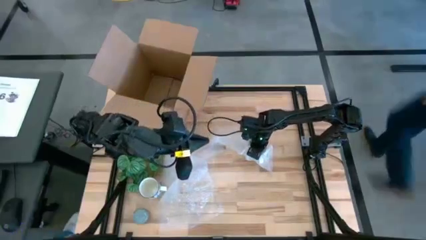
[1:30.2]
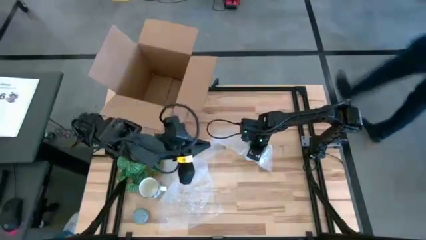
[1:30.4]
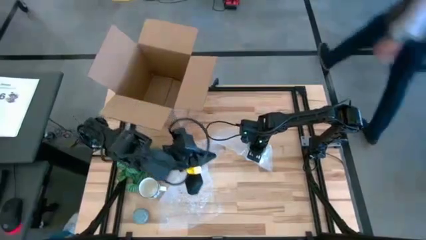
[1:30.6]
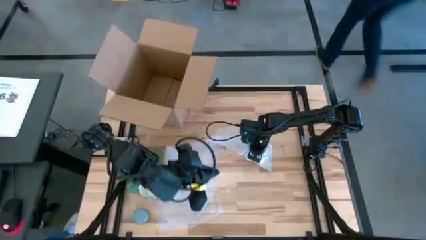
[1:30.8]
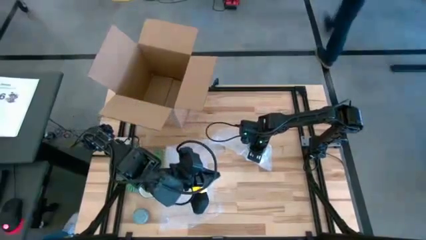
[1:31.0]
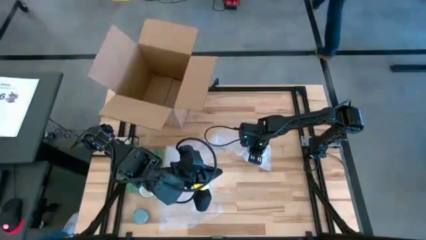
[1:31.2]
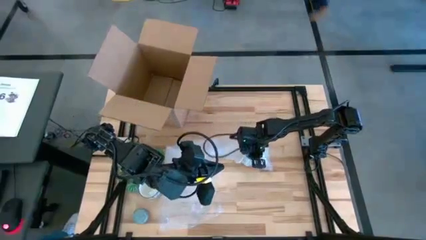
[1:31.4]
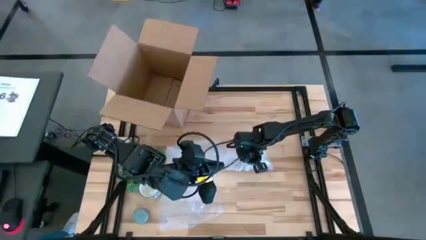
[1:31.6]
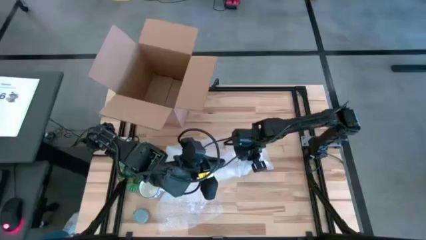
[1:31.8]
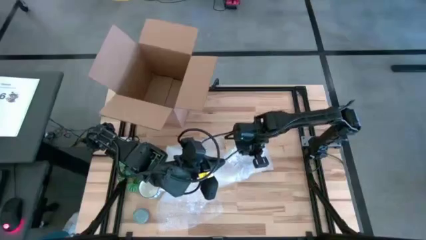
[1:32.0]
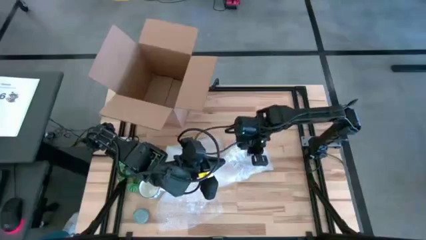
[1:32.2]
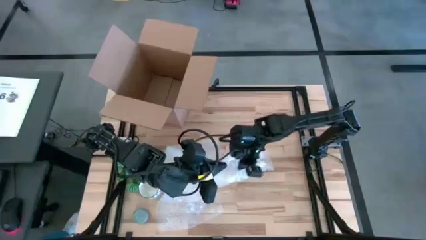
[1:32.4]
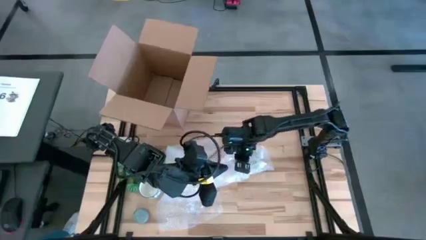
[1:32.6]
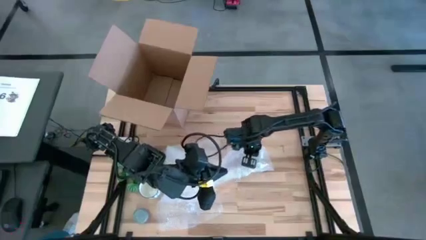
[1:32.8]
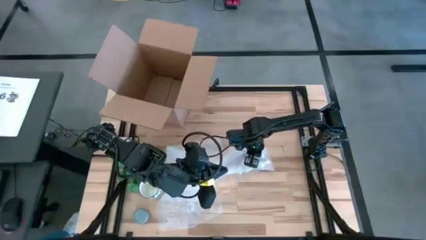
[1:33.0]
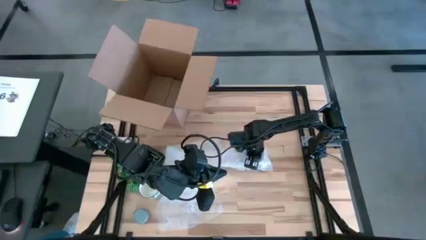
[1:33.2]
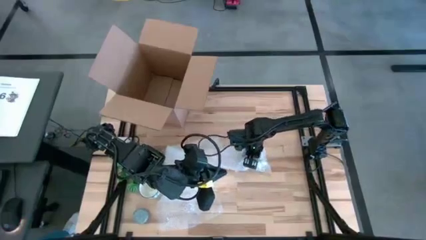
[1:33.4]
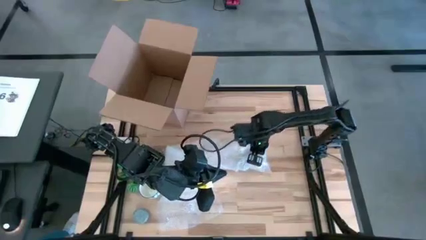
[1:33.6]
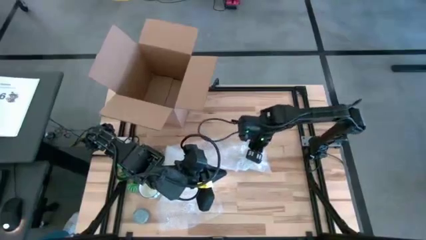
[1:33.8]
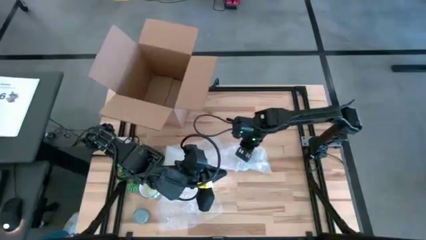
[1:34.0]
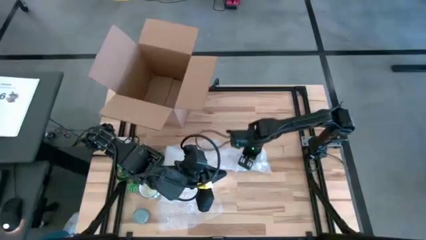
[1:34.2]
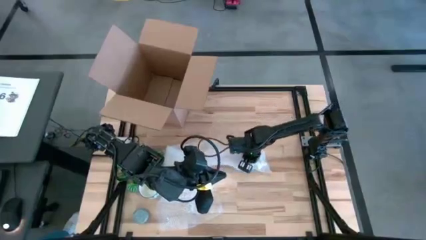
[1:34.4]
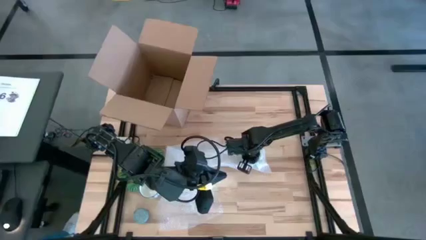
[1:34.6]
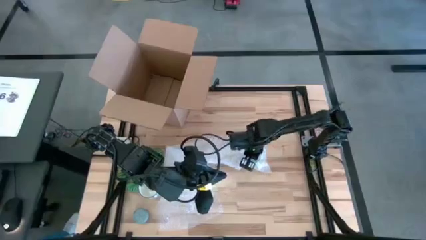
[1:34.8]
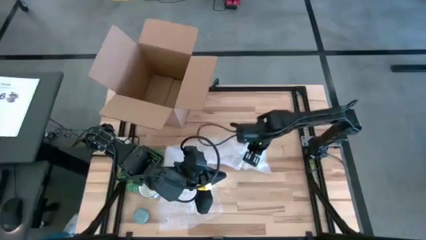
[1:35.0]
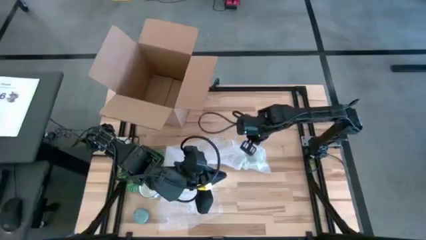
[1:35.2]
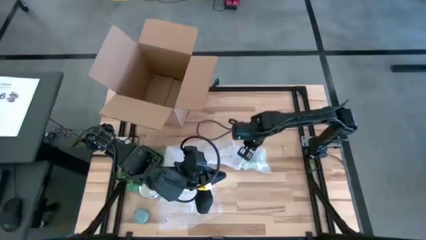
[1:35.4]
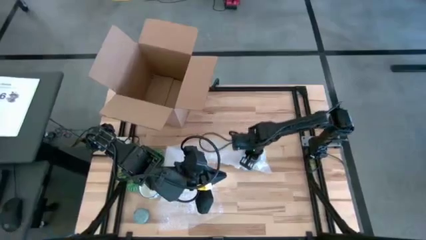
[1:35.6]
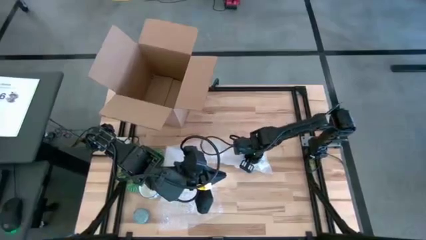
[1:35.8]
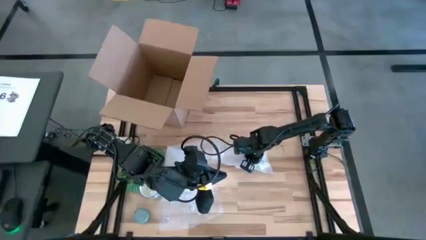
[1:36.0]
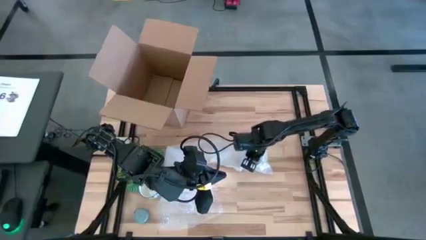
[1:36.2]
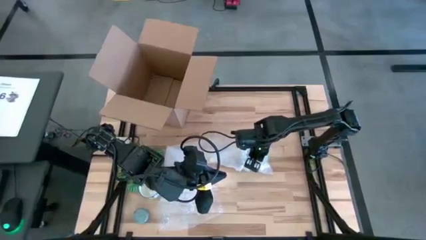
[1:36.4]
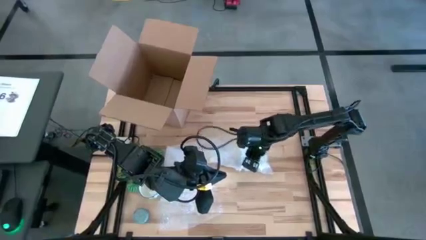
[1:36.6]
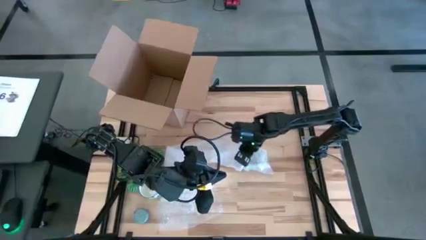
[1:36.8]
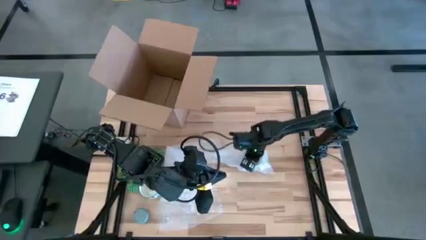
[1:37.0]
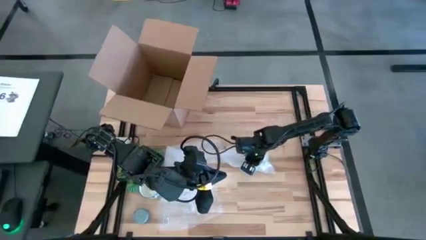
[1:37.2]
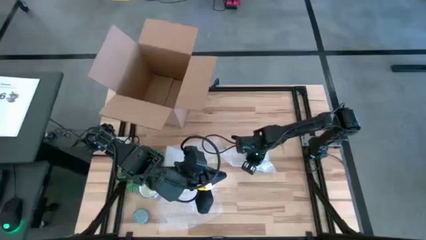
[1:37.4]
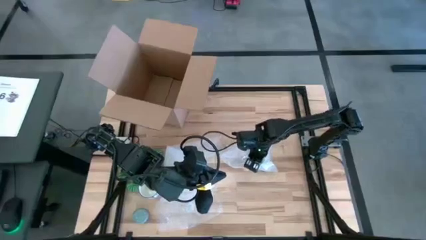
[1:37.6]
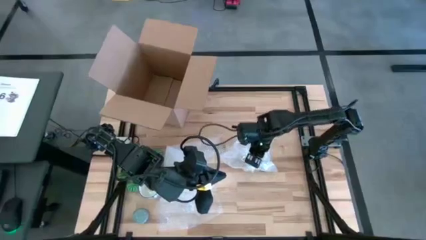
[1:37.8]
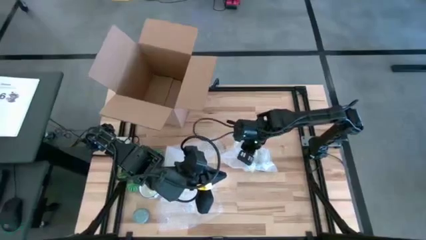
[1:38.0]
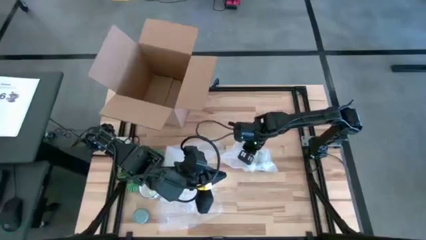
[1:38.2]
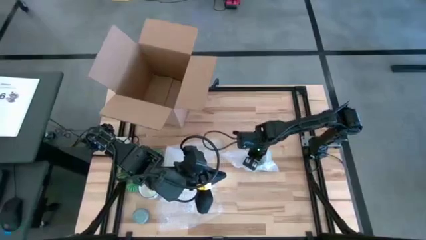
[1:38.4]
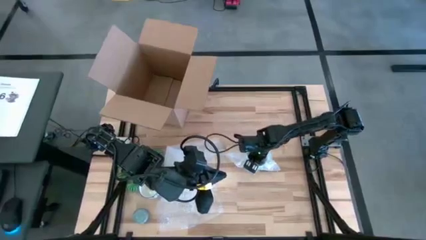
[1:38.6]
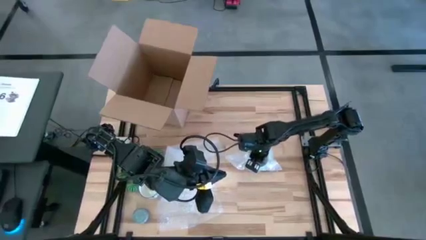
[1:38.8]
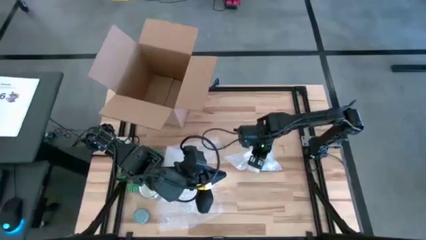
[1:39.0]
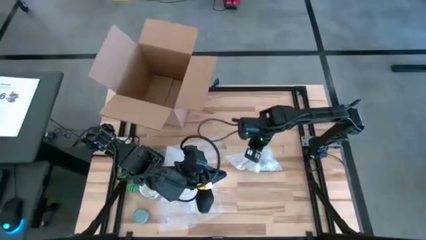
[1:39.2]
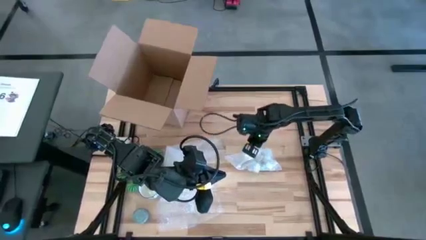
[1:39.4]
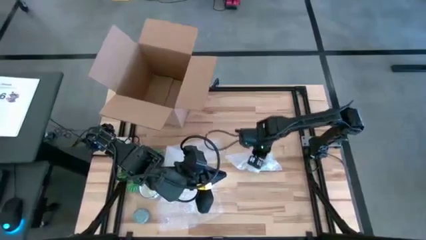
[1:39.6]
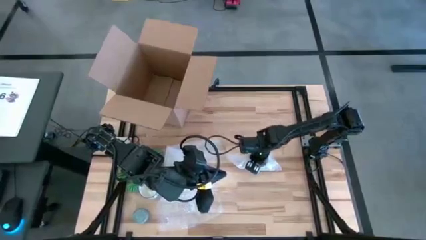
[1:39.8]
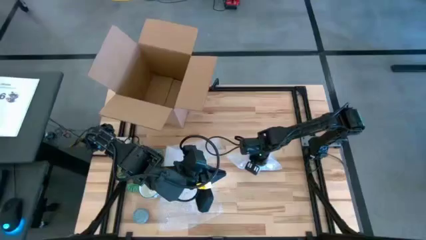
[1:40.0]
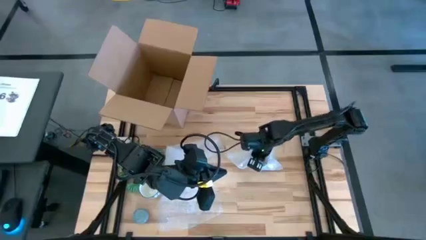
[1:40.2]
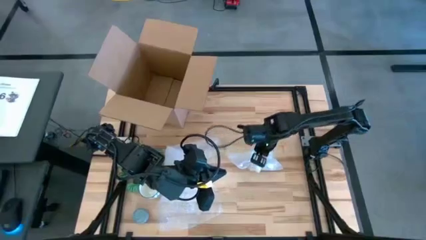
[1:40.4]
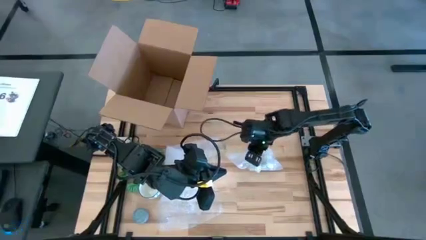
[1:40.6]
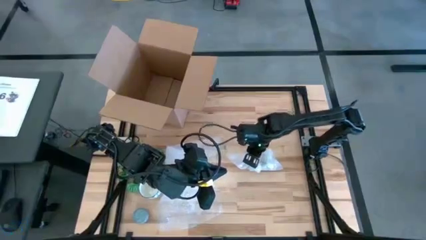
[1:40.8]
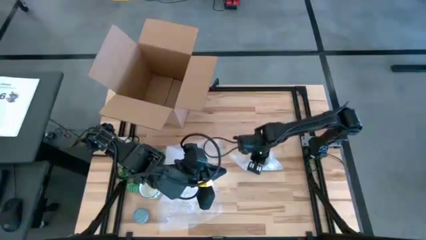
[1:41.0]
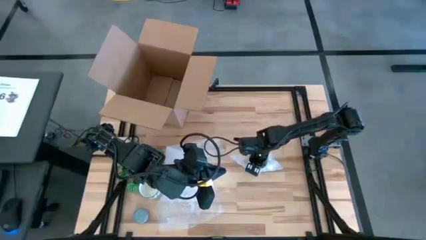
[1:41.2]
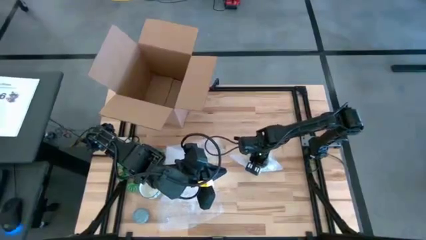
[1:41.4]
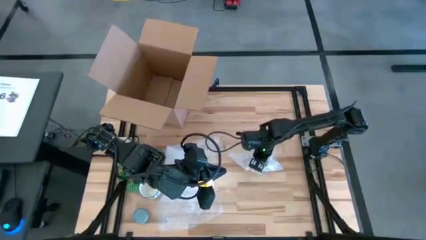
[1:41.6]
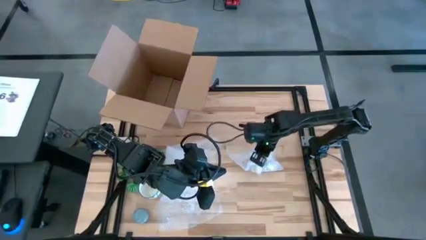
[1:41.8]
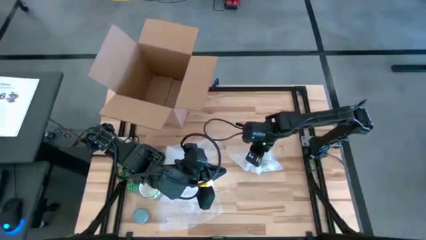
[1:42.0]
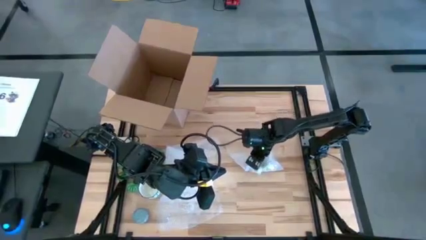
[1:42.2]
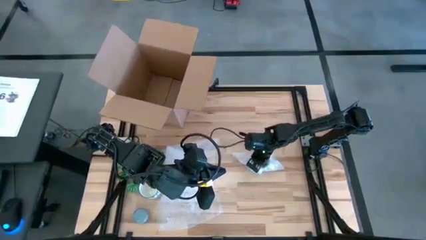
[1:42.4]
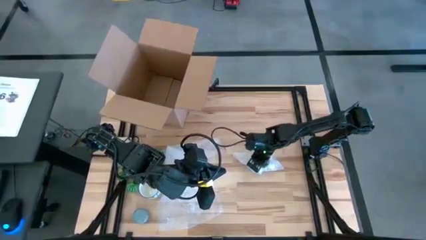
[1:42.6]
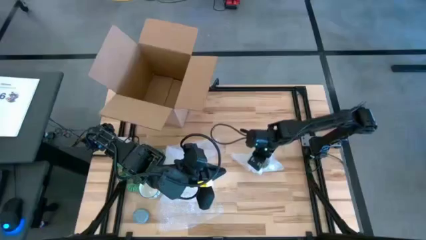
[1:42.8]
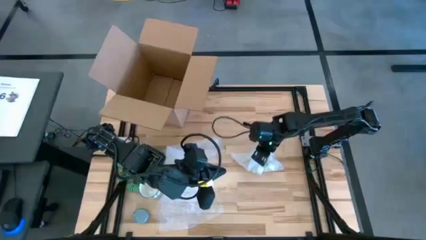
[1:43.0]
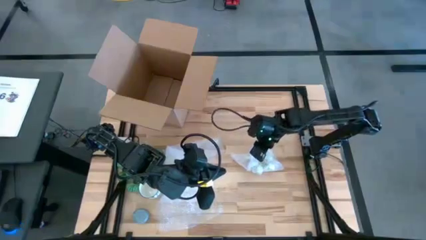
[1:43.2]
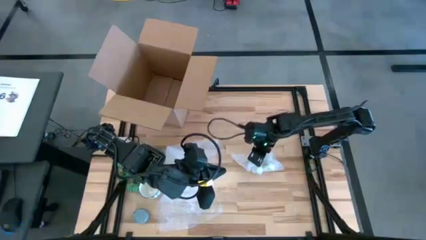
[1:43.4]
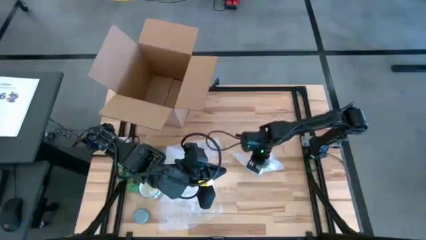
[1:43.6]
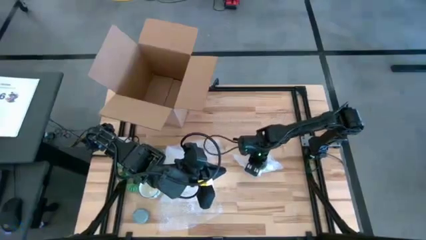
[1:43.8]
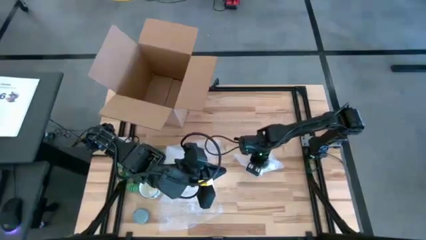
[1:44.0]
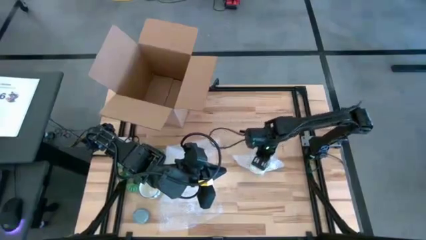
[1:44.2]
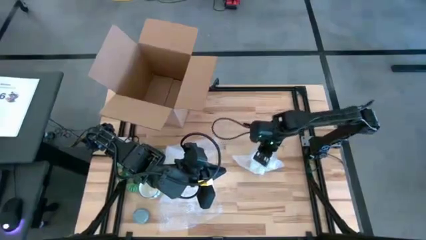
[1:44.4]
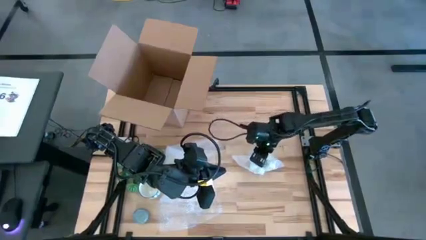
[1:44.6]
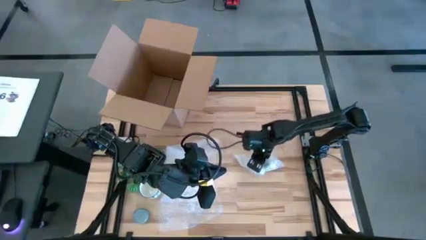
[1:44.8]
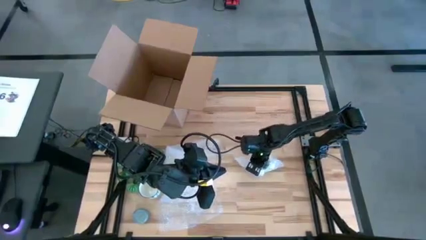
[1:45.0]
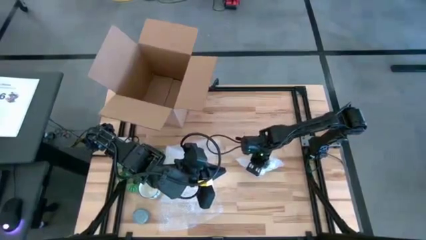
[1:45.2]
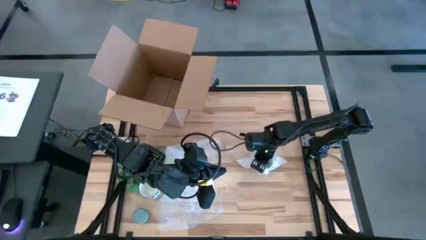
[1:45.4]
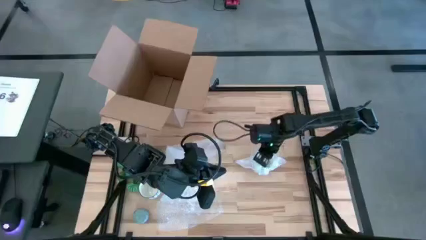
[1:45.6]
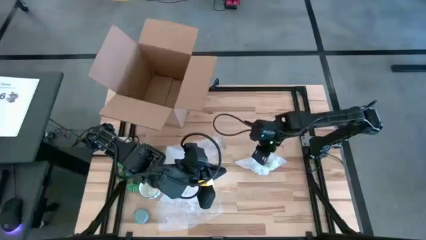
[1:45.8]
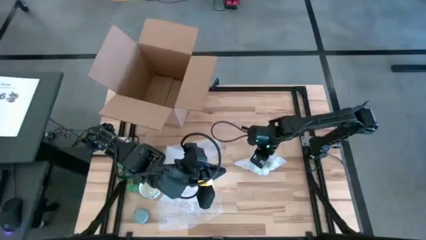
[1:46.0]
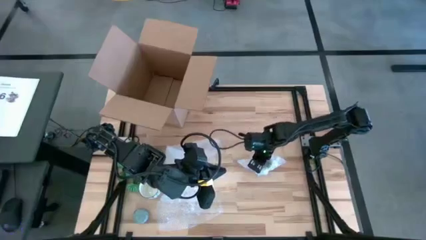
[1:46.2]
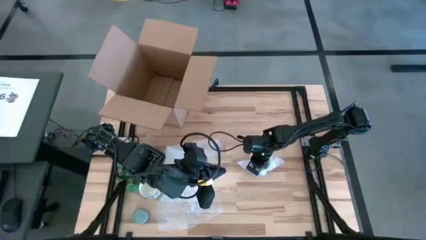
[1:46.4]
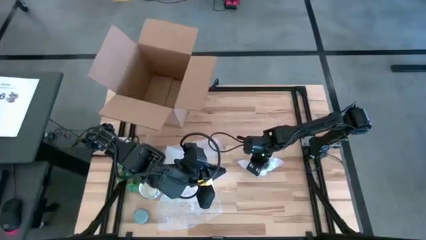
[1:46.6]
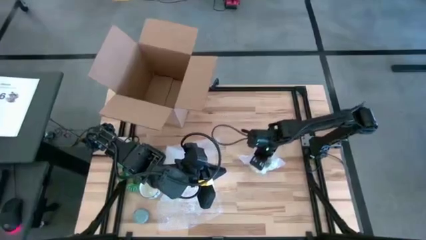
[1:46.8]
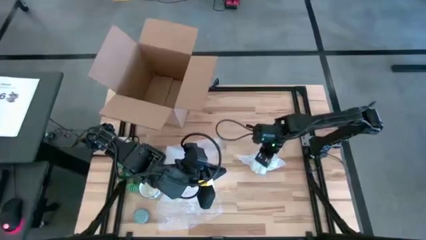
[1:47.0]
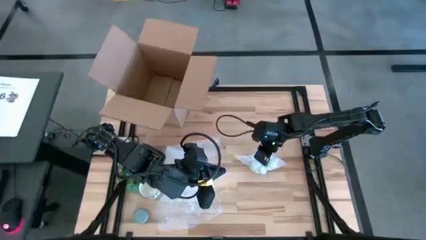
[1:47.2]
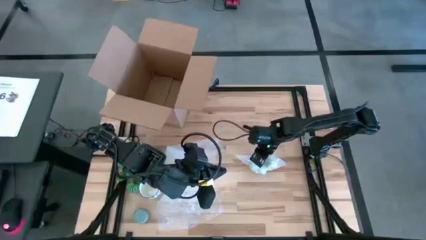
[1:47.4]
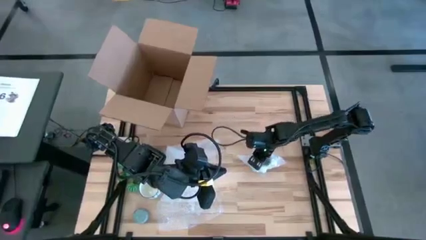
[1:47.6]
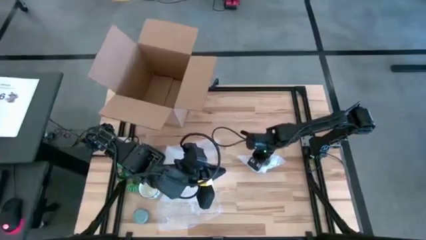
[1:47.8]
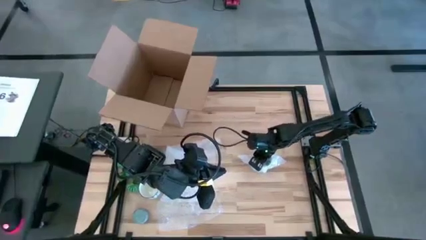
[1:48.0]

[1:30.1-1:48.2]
Task: wrap mug
Wrap the green mug with bubble wrap
